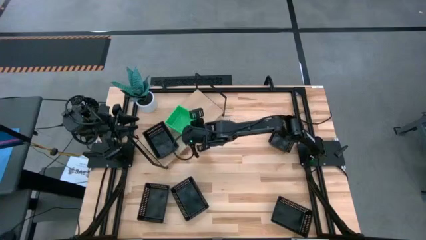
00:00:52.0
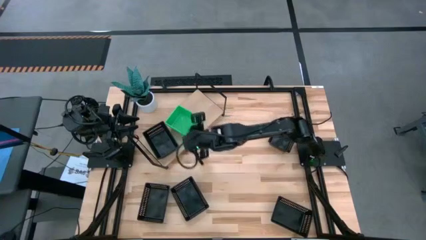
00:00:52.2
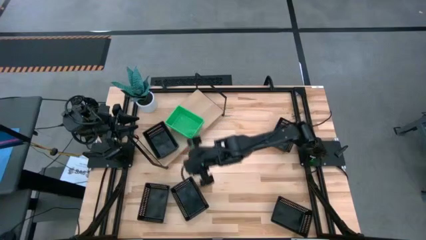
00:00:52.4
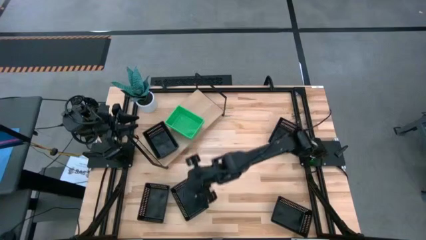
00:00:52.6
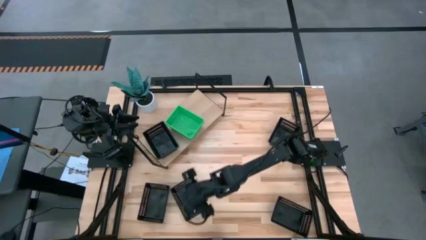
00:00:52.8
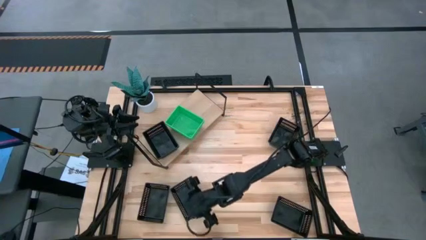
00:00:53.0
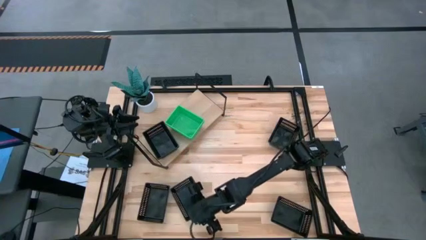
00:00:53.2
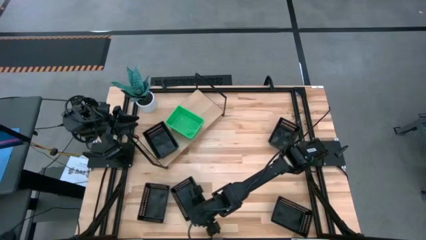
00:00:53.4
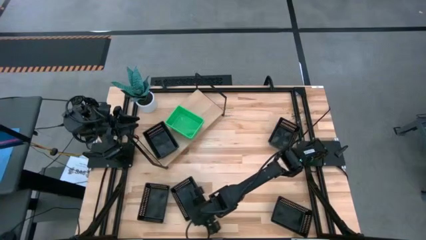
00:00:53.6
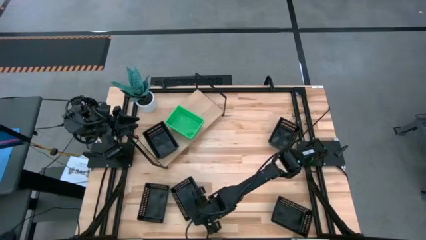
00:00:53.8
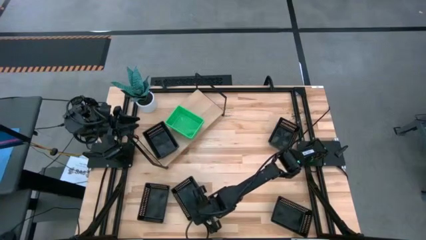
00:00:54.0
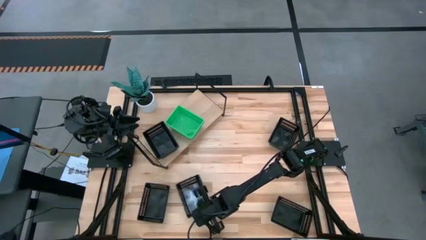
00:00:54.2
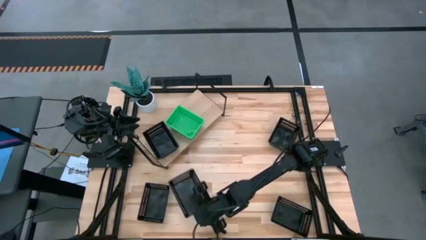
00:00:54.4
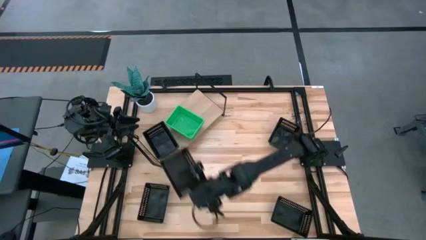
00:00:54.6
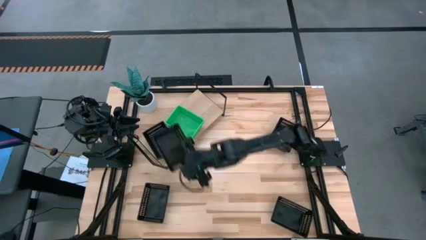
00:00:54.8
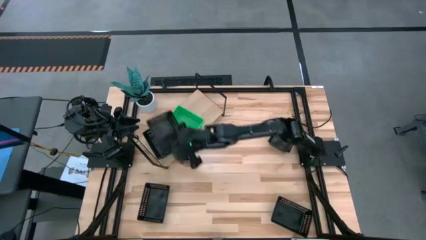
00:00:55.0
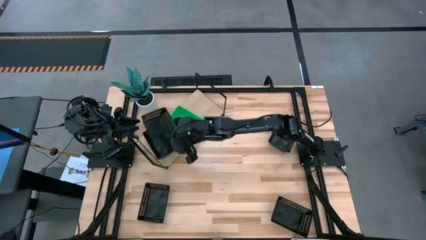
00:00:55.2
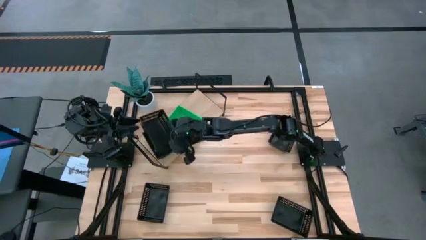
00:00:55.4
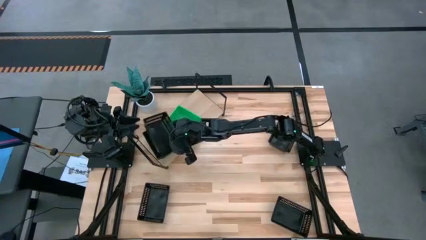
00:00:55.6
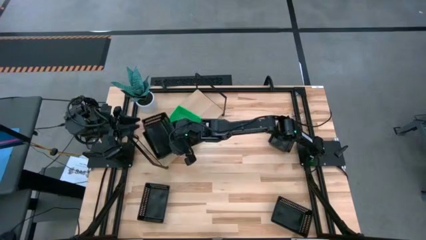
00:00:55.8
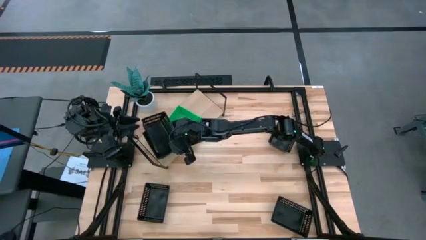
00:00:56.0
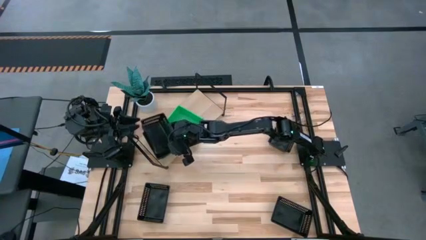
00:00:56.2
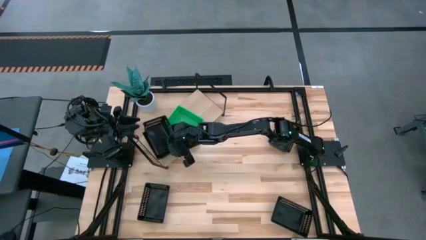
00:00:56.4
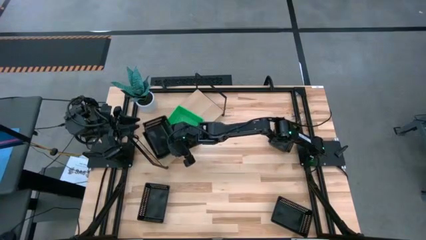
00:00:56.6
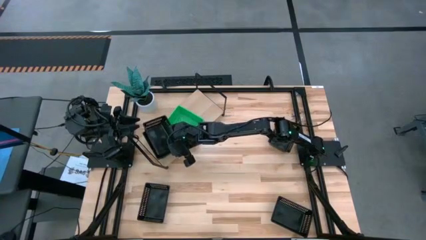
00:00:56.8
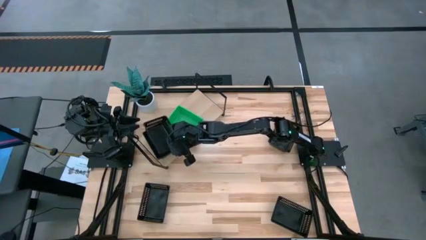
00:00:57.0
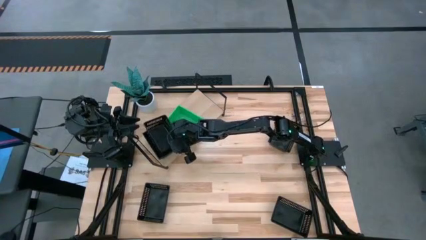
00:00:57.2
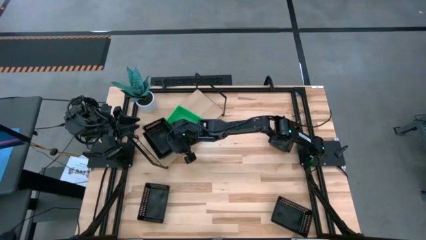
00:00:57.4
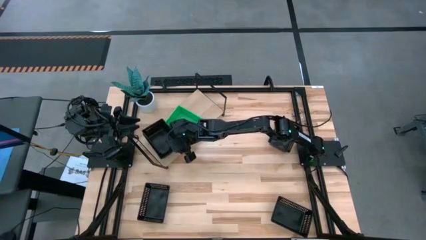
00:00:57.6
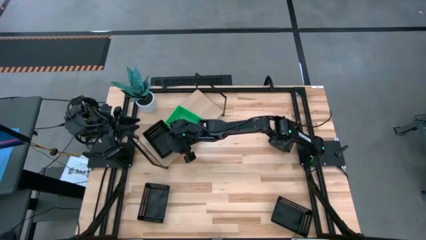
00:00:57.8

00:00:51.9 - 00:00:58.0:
Task: Stack baskets on shelf by color
Stack the black bin on the top of the black bins on the shelf

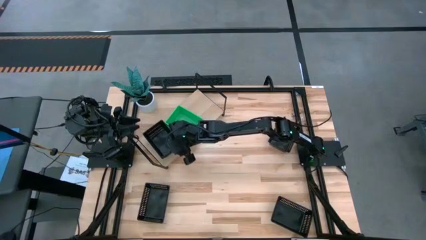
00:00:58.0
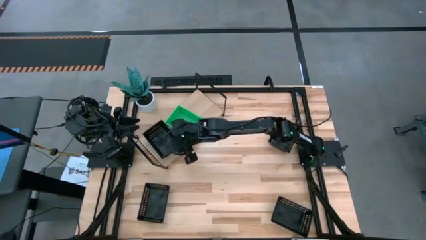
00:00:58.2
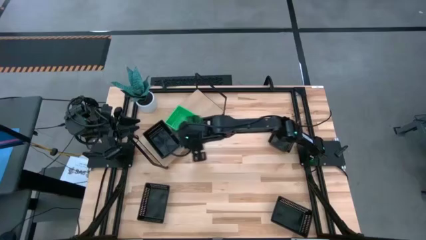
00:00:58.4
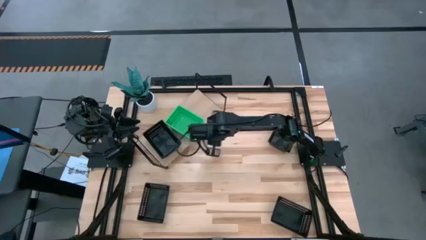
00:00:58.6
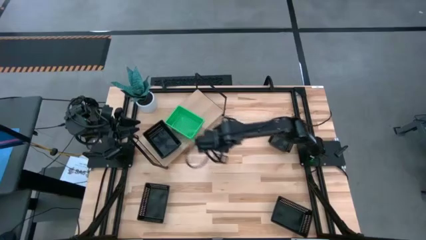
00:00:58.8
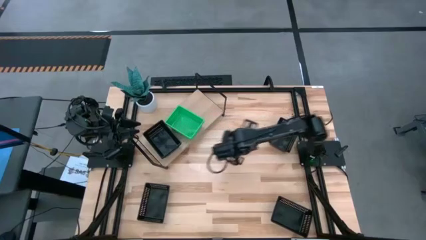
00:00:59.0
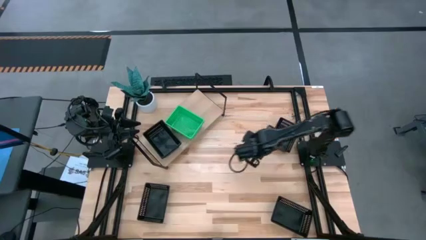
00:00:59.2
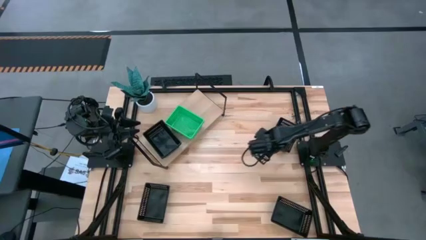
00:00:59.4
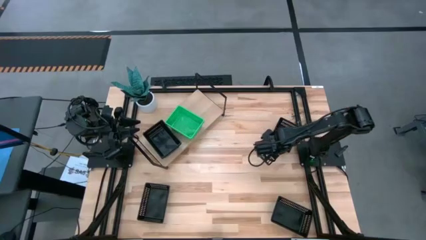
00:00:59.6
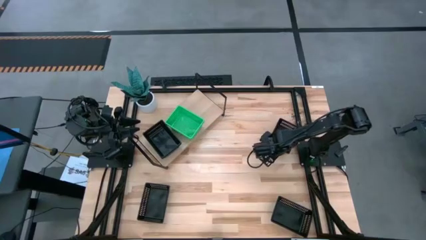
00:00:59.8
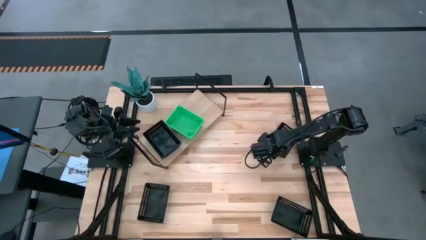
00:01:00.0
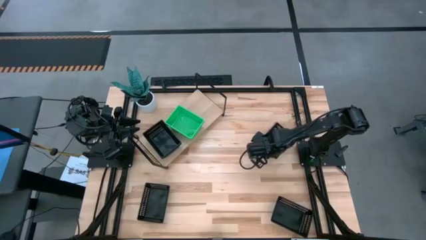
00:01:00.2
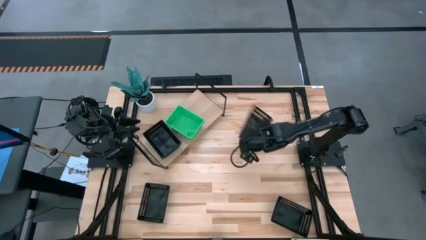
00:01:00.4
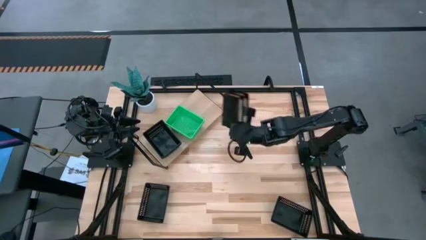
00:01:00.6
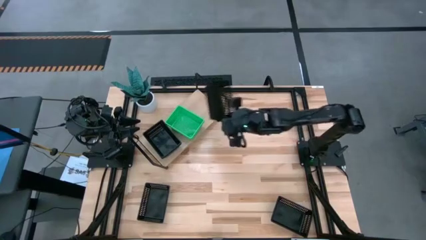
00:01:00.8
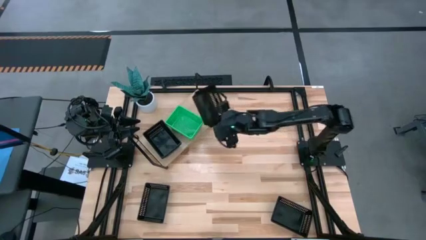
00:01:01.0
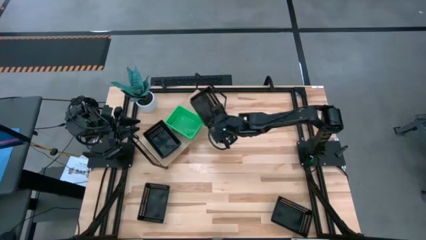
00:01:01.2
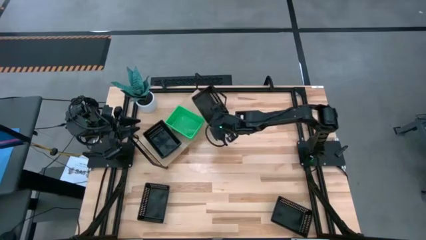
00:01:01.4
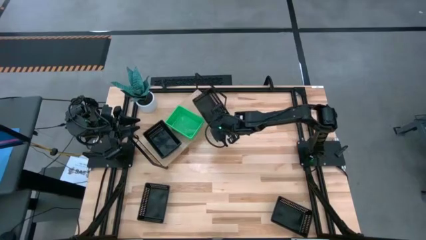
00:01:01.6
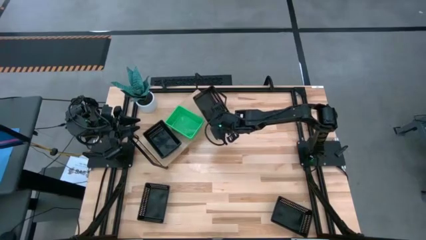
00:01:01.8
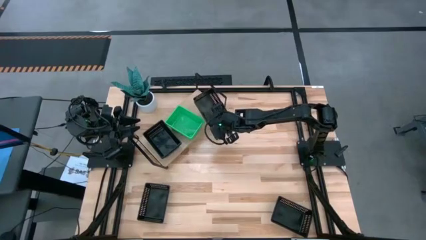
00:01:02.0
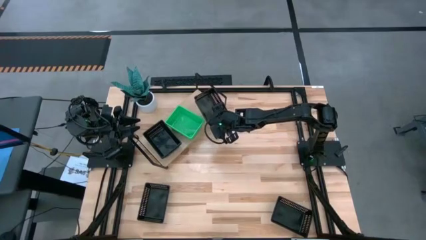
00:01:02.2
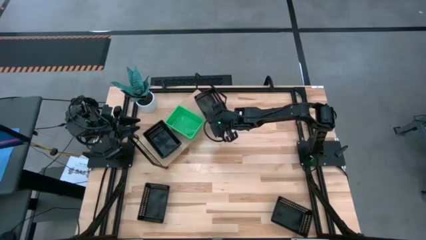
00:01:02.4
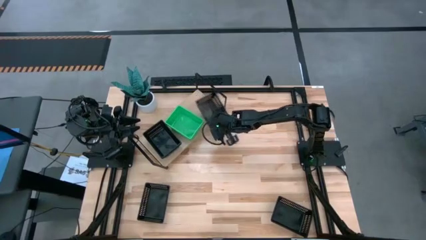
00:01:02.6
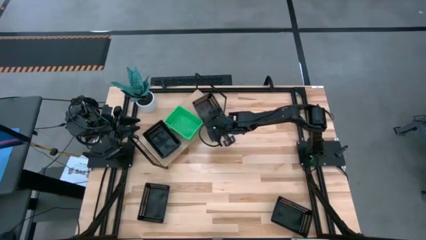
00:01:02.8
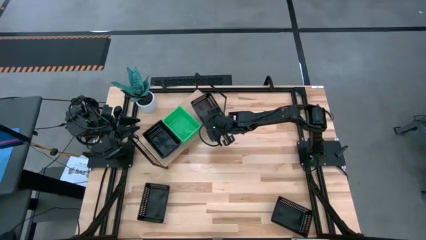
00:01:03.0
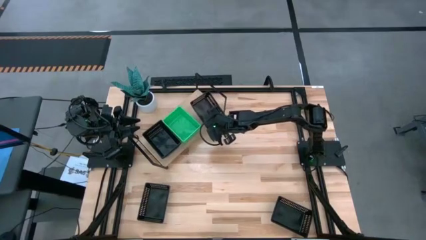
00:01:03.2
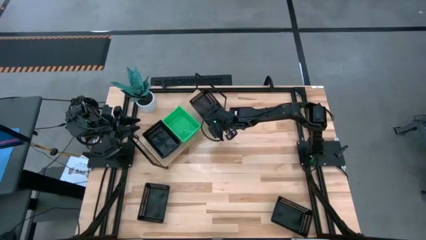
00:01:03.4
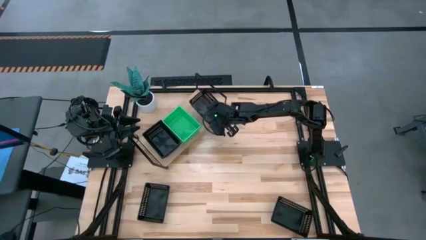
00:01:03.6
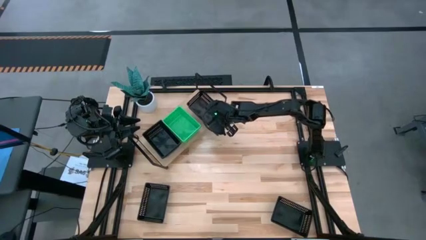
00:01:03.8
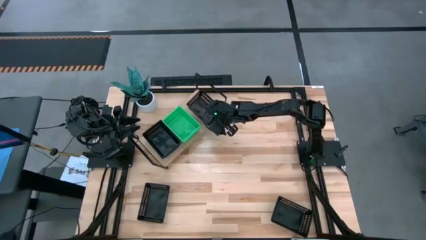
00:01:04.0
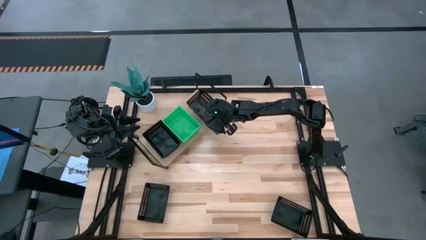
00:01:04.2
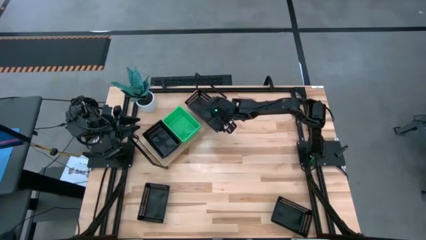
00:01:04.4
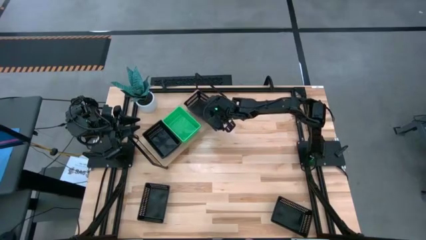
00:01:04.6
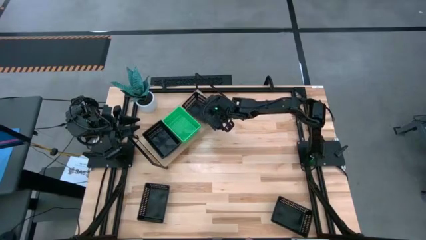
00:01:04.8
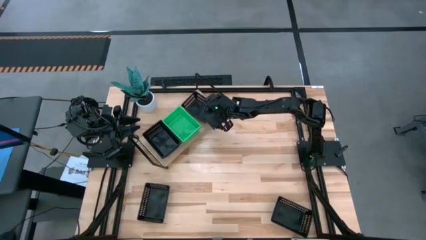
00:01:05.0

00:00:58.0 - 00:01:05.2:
Put the black bin on the shelf
